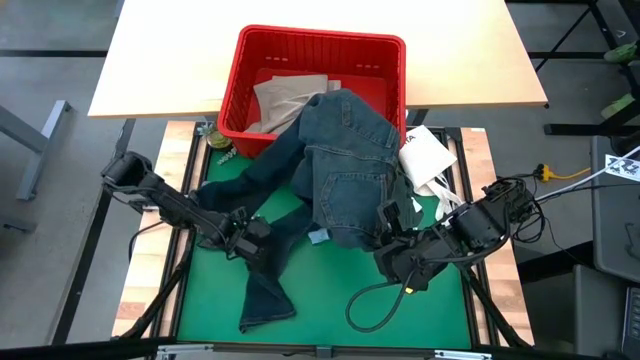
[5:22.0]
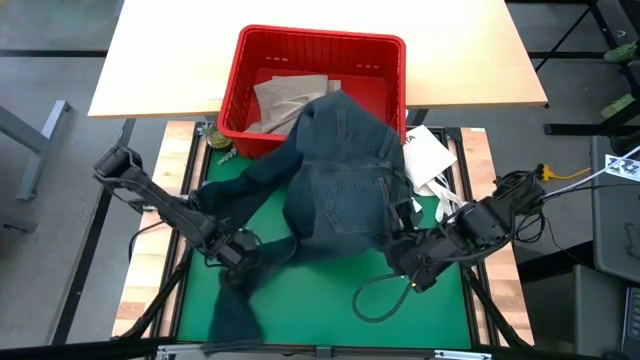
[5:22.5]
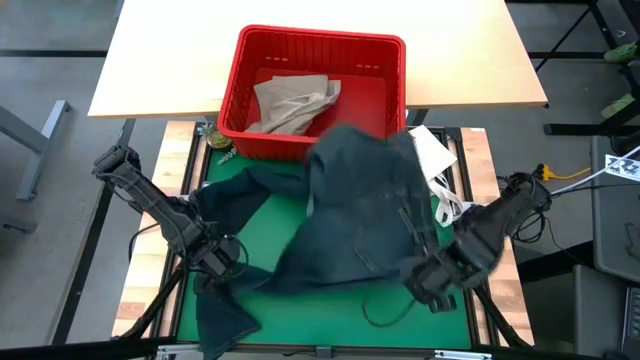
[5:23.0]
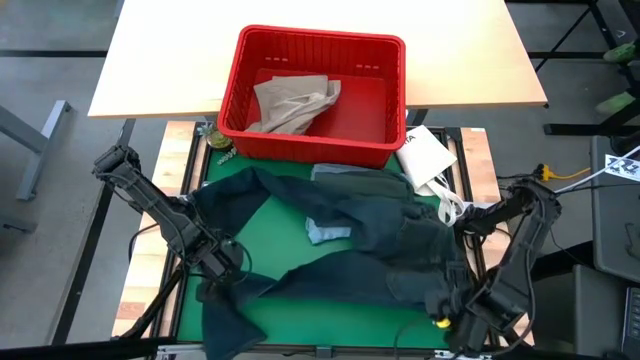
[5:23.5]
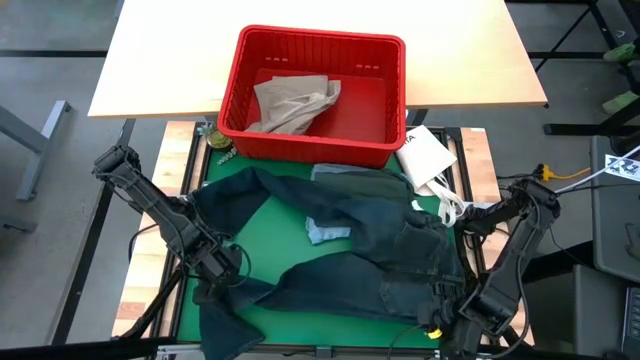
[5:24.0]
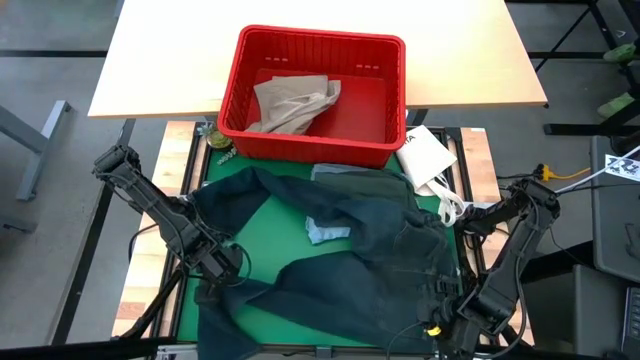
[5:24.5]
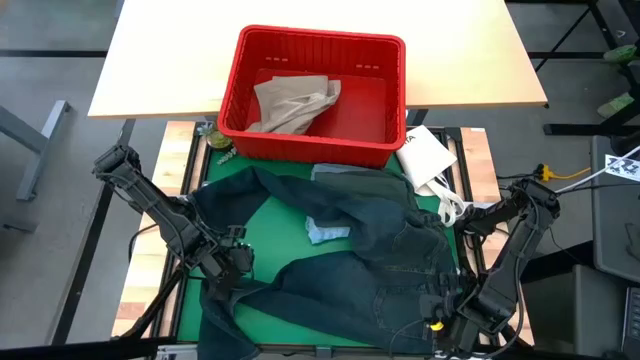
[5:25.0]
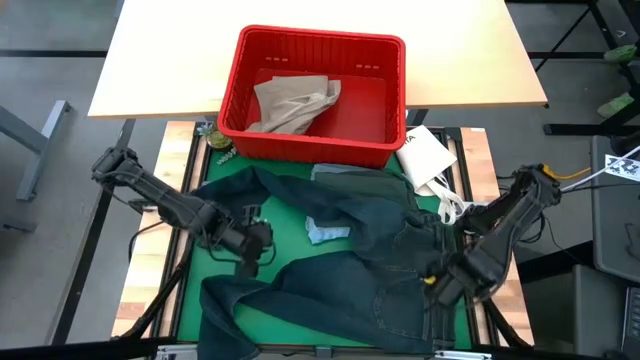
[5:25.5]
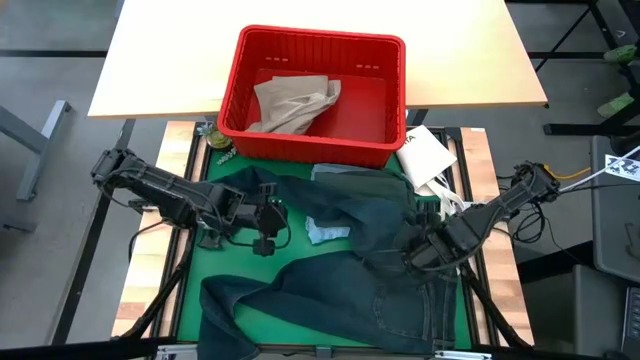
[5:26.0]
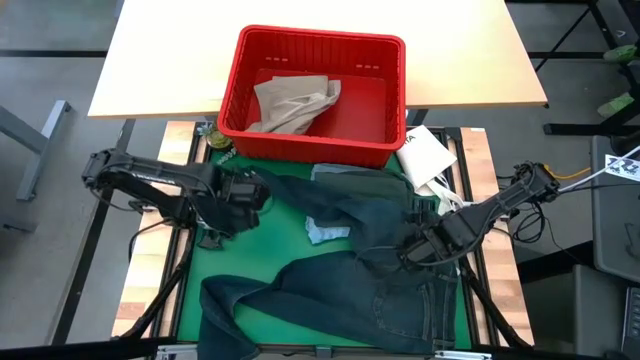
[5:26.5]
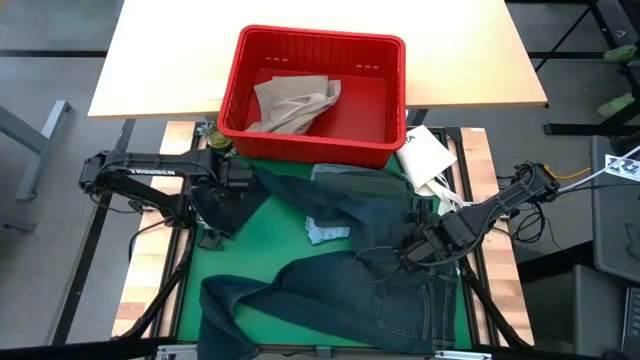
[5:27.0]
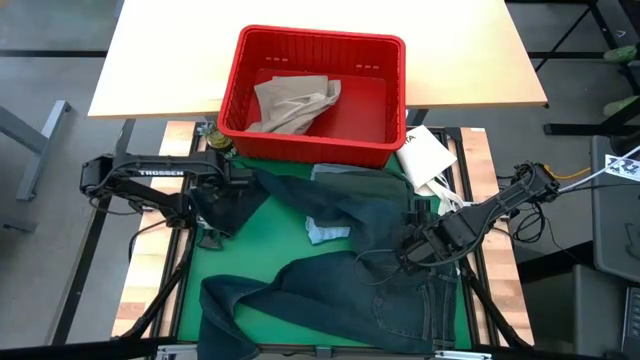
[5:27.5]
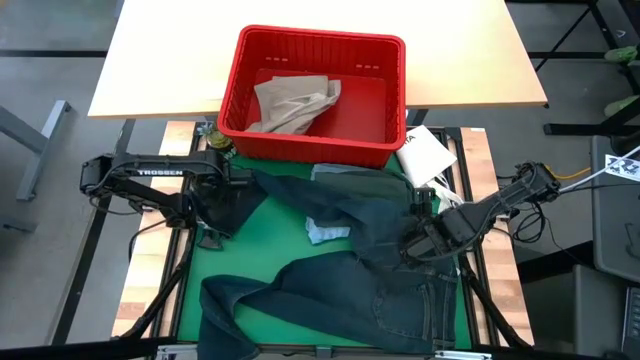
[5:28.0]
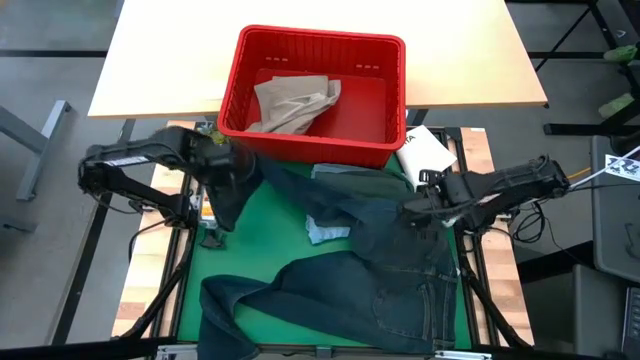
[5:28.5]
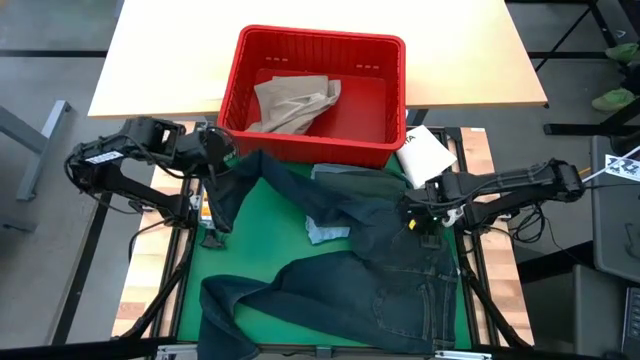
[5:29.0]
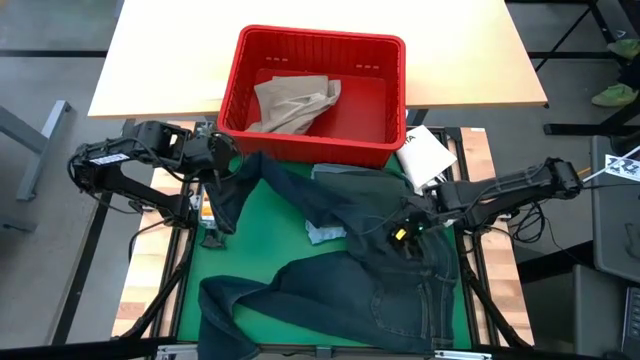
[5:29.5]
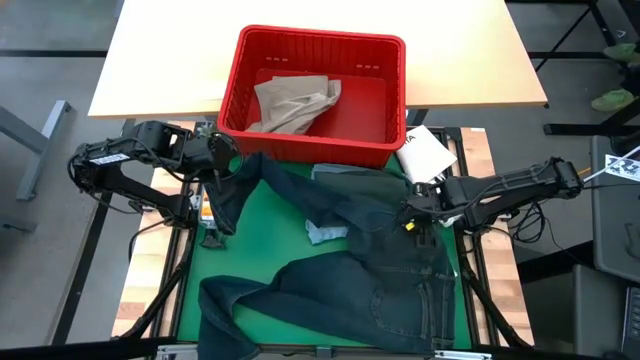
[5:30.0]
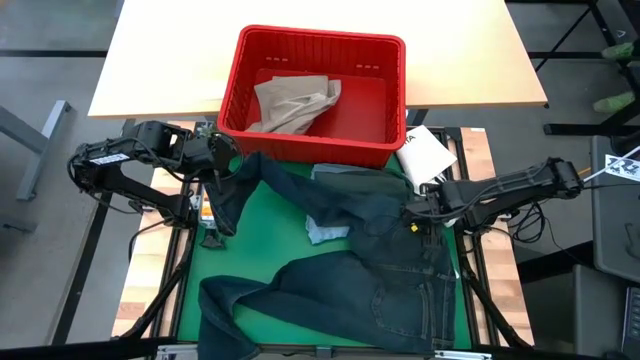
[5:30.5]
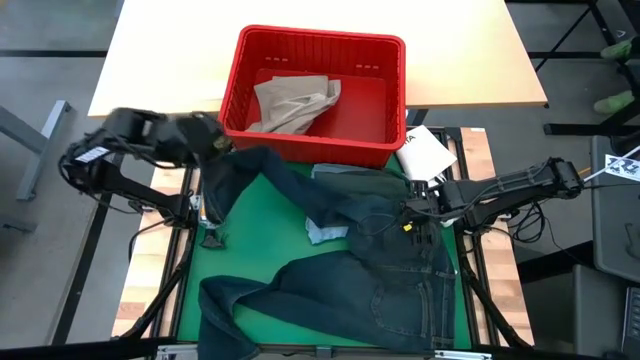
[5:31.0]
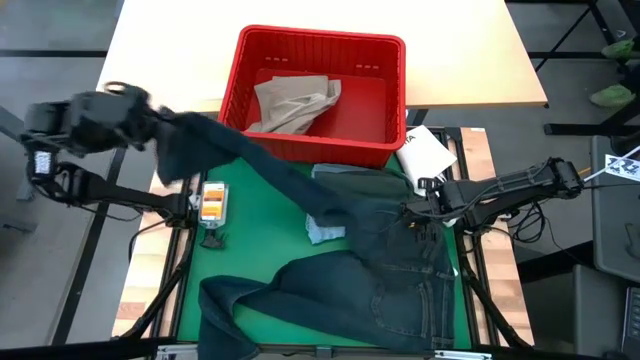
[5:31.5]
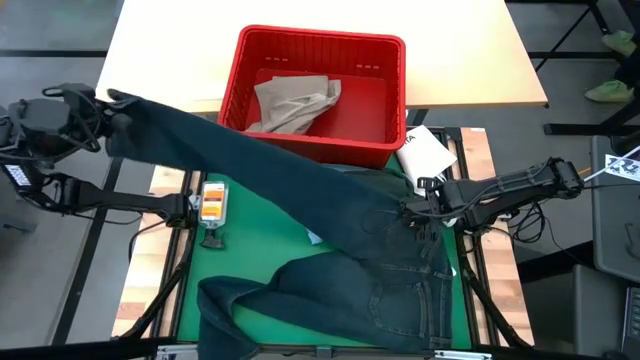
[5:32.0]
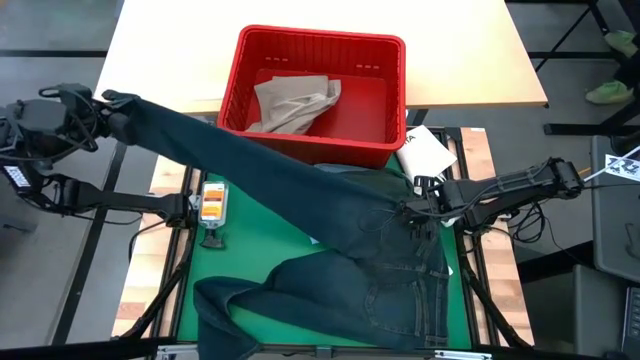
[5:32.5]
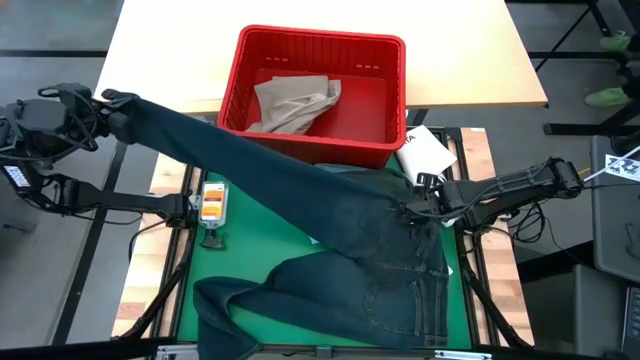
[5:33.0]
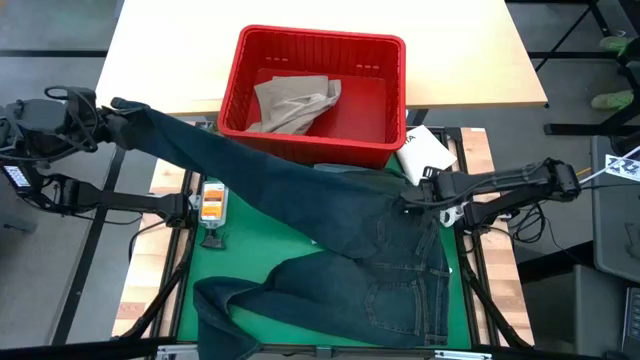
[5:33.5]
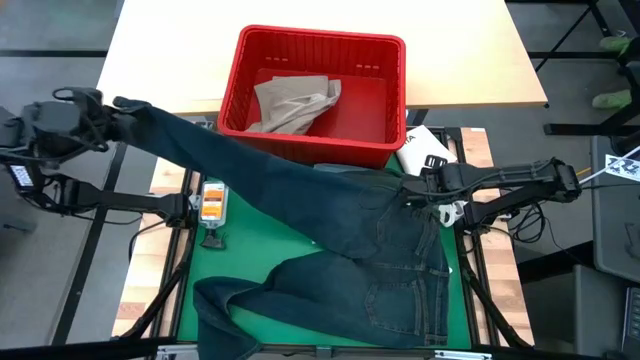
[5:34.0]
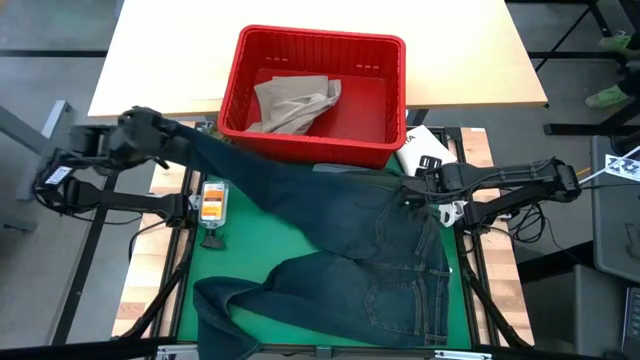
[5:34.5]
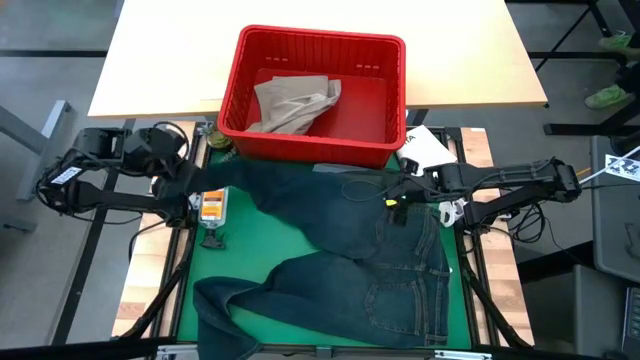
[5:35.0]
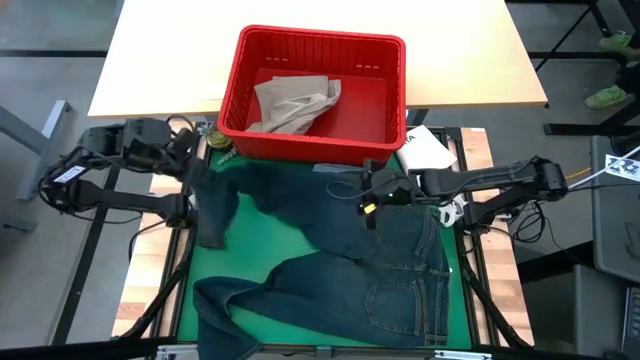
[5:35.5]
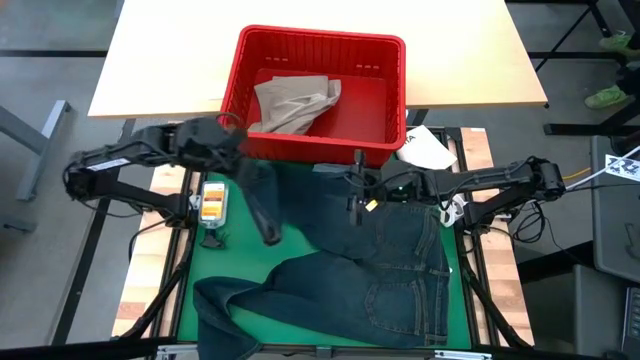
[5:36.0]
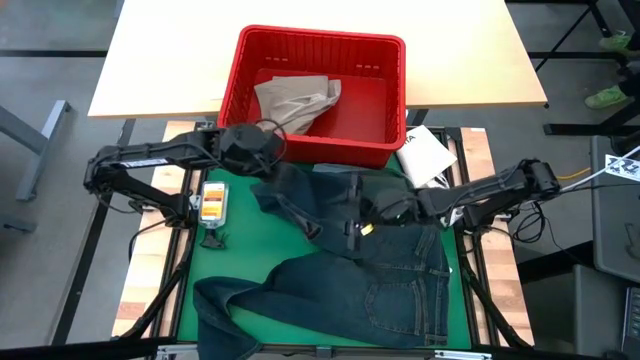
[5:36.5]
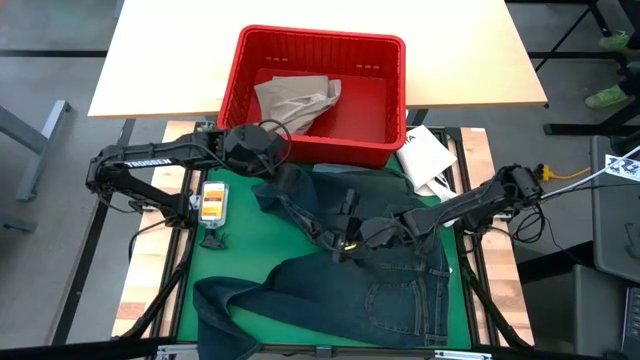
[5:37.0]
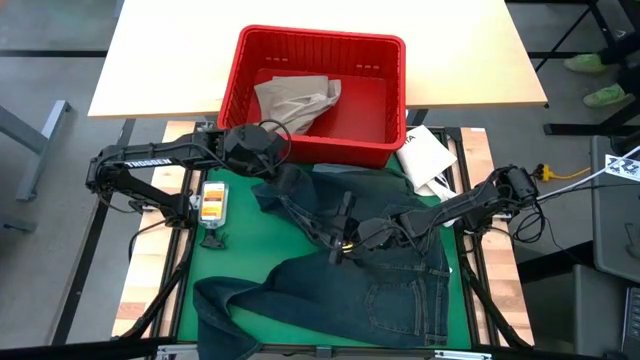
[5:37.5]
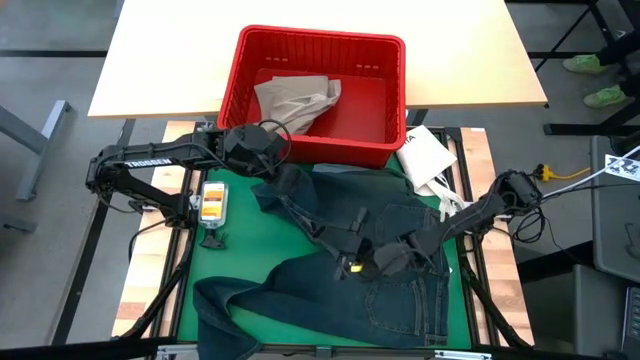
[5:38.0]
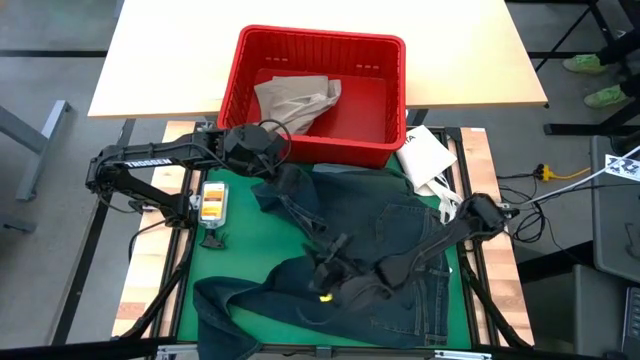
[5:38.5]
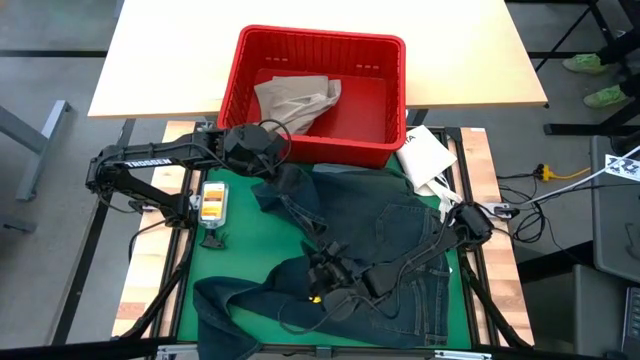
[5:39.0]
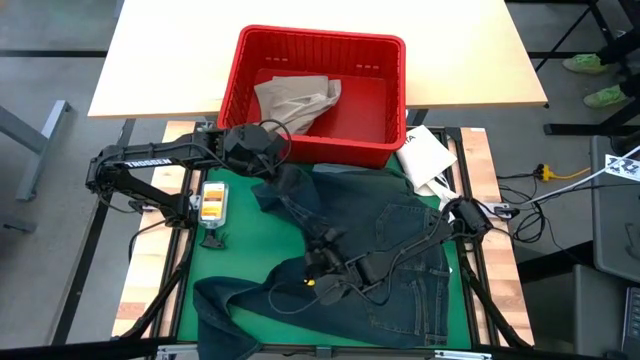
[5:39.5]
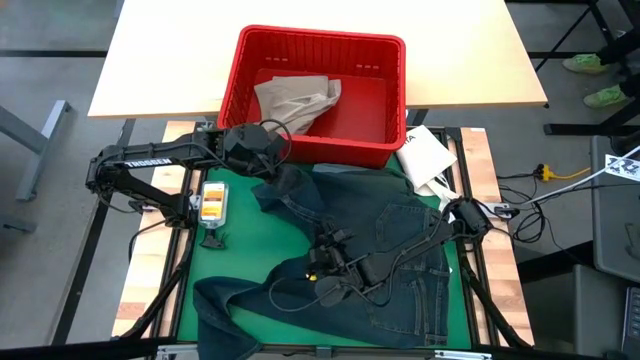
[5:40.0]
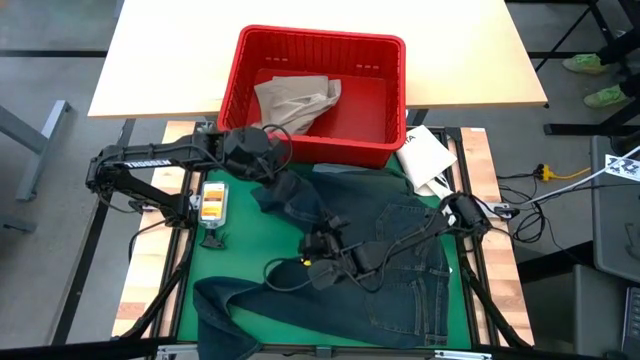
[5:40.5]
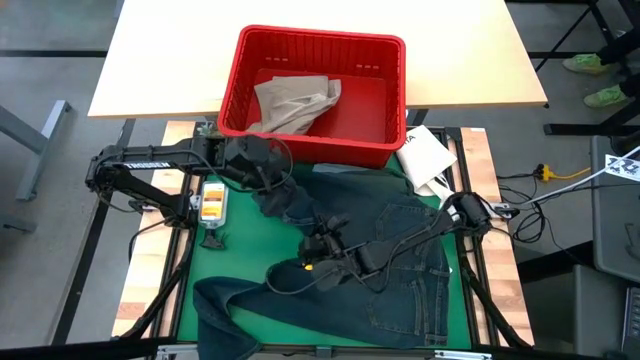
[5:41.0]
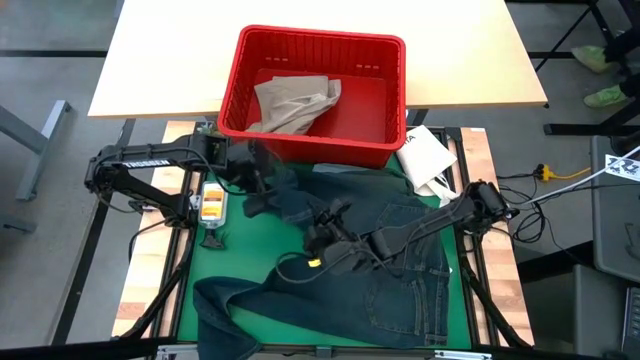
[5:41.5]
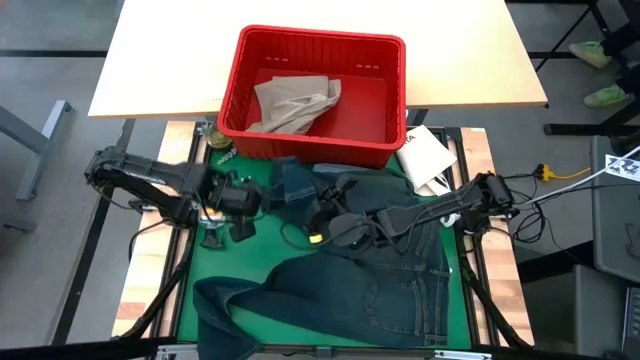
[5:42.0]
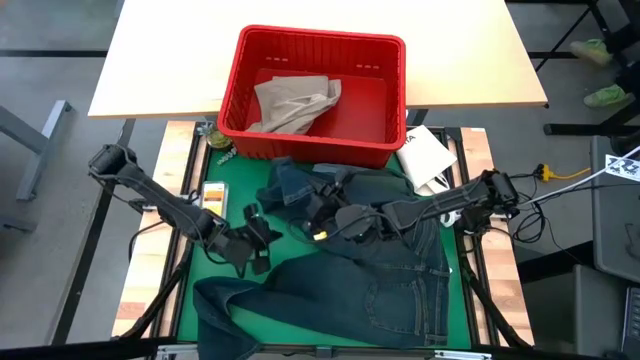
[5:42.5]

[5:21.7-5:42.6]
Task: Fold Laundry from Bin
Fold the dark blue pants
